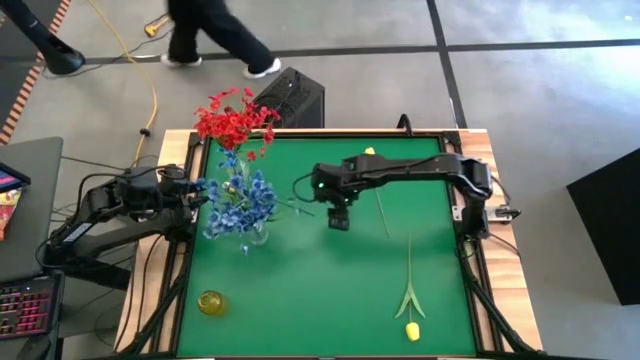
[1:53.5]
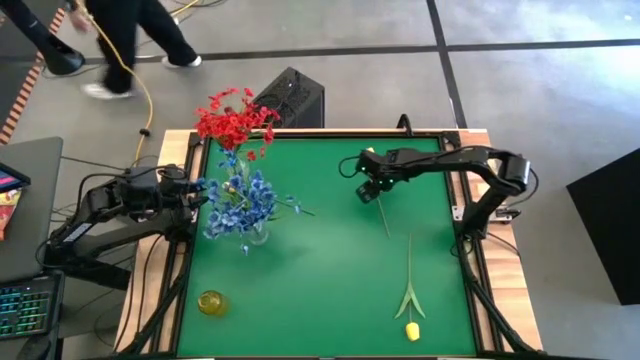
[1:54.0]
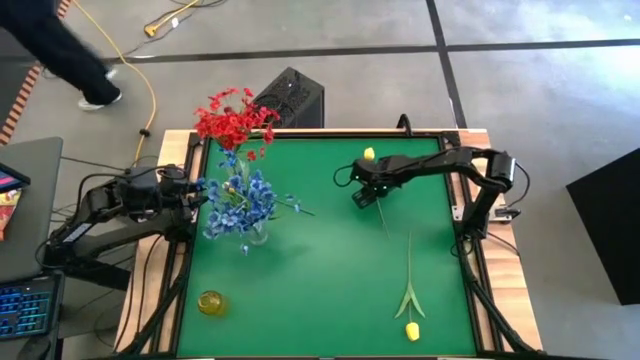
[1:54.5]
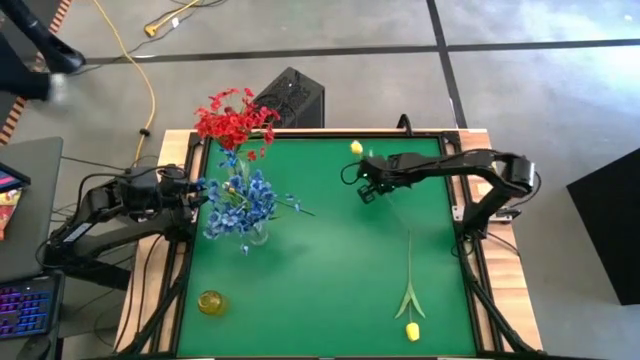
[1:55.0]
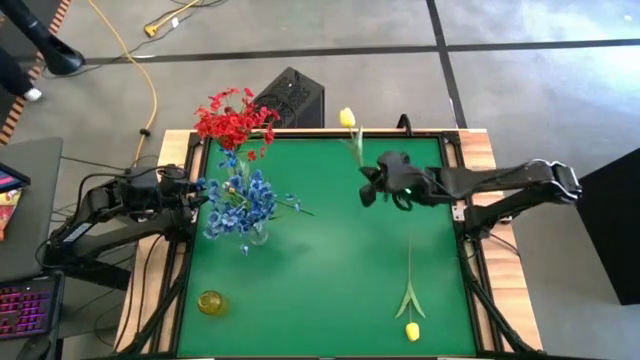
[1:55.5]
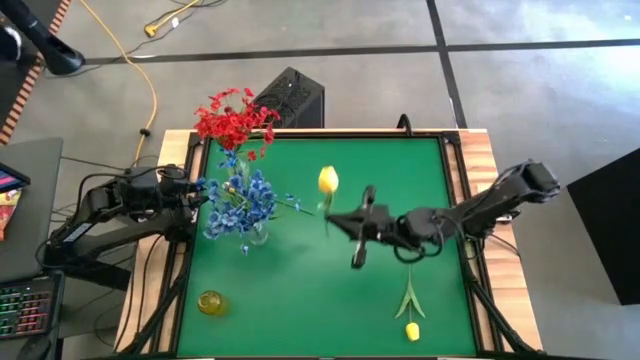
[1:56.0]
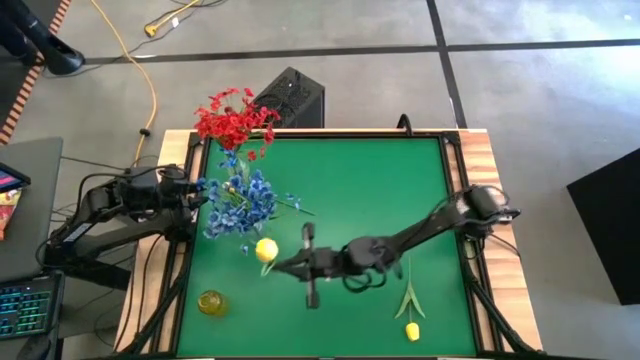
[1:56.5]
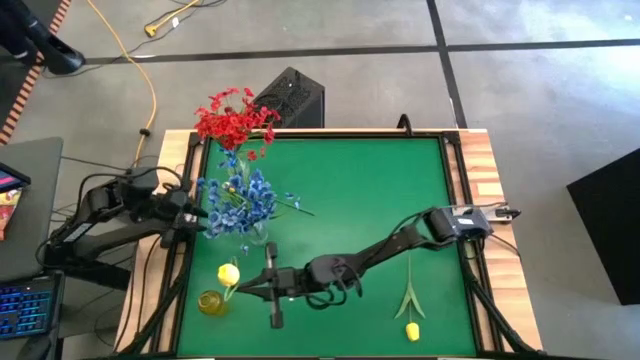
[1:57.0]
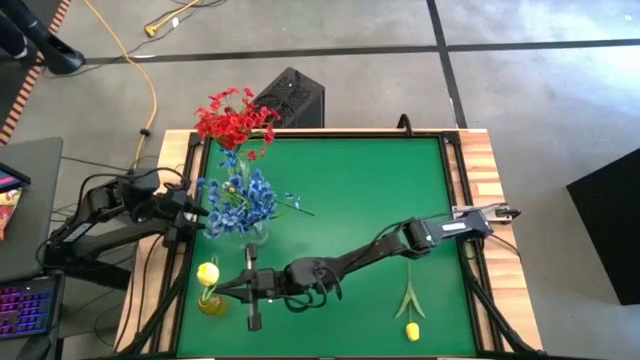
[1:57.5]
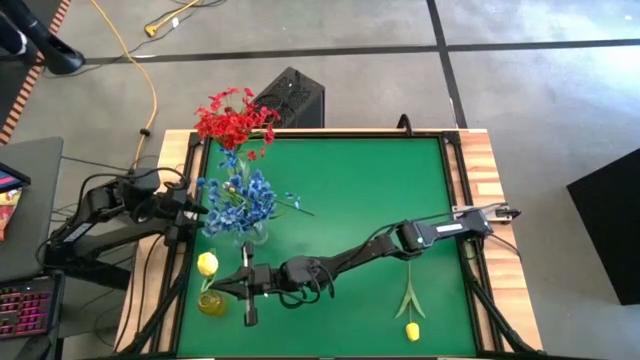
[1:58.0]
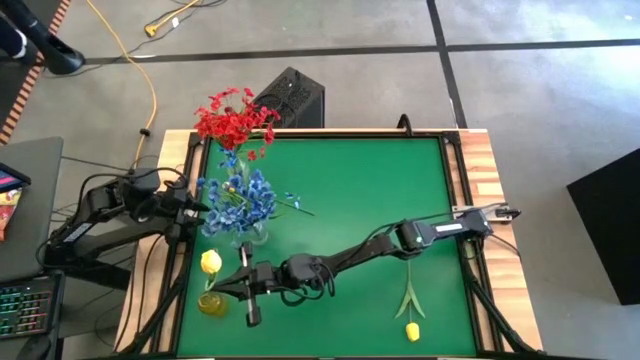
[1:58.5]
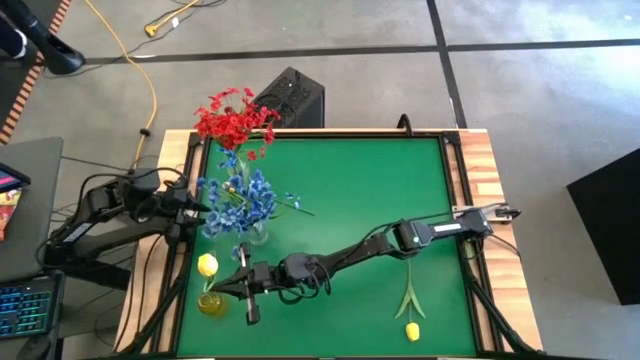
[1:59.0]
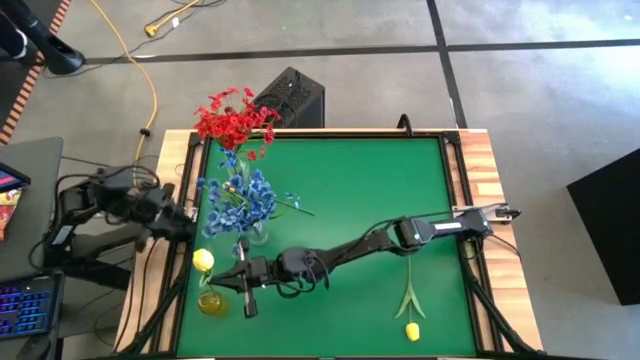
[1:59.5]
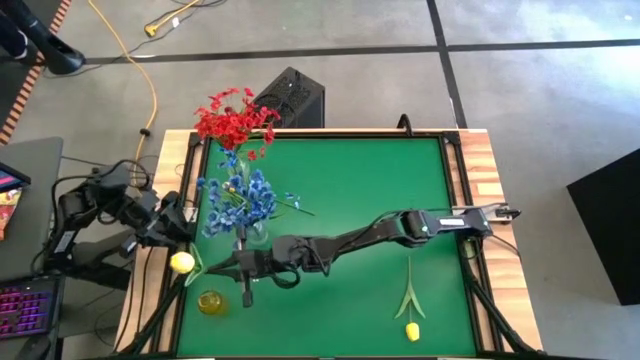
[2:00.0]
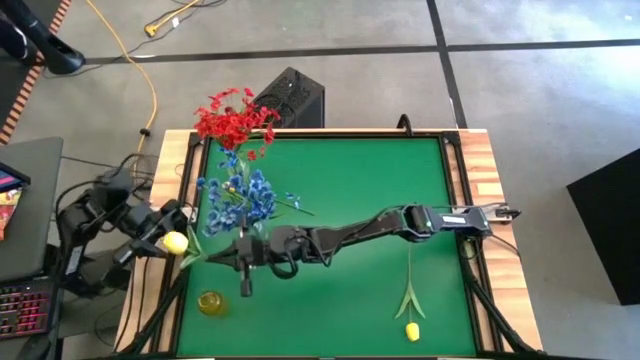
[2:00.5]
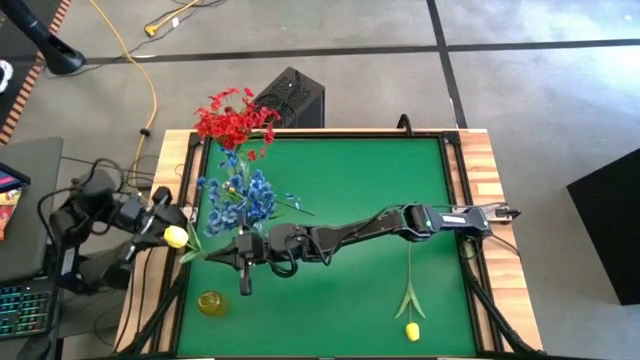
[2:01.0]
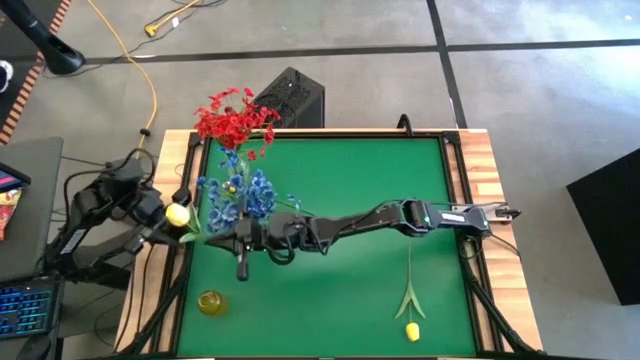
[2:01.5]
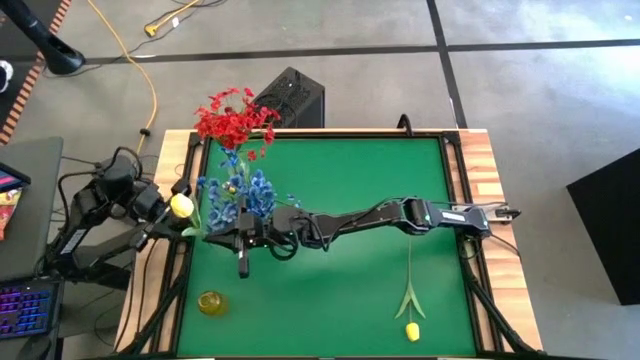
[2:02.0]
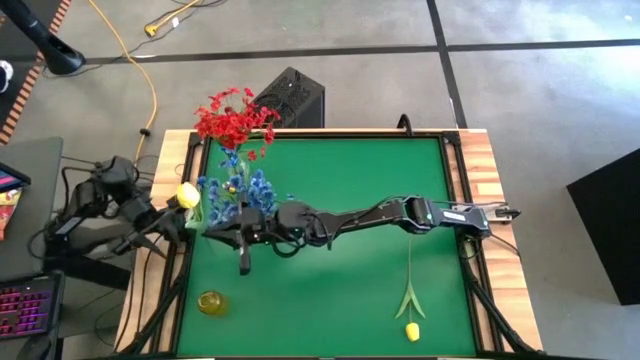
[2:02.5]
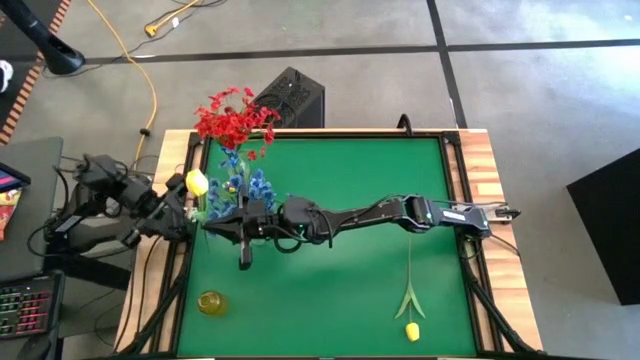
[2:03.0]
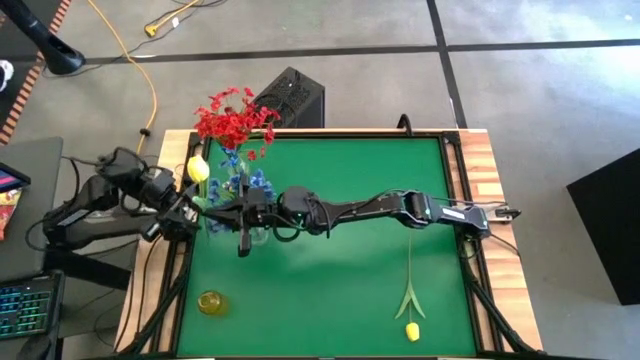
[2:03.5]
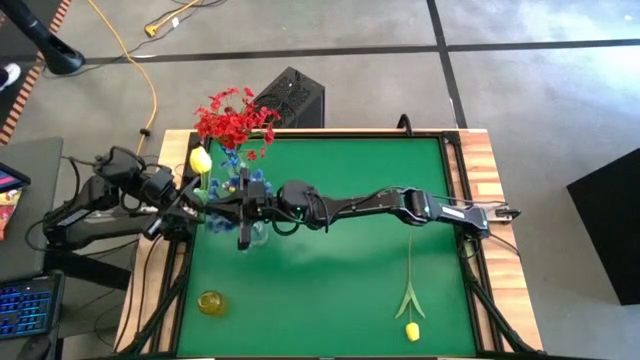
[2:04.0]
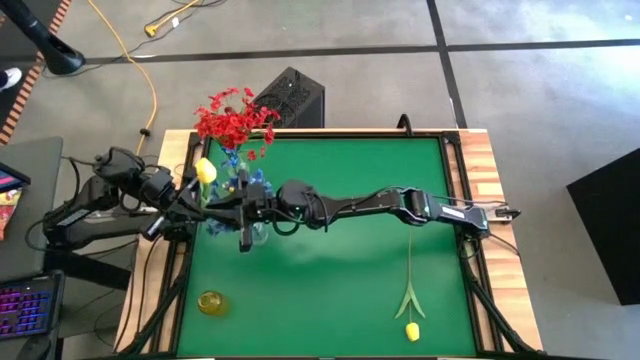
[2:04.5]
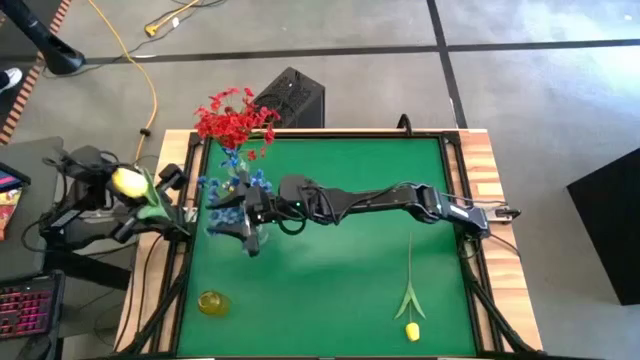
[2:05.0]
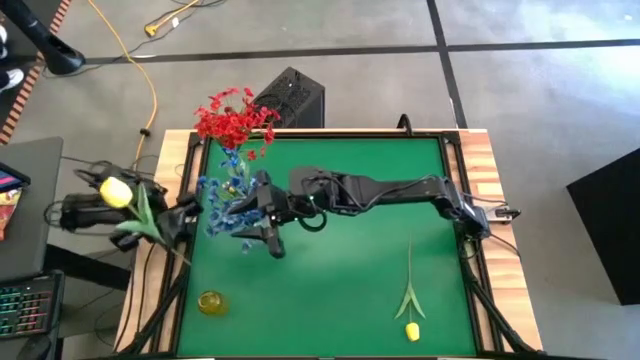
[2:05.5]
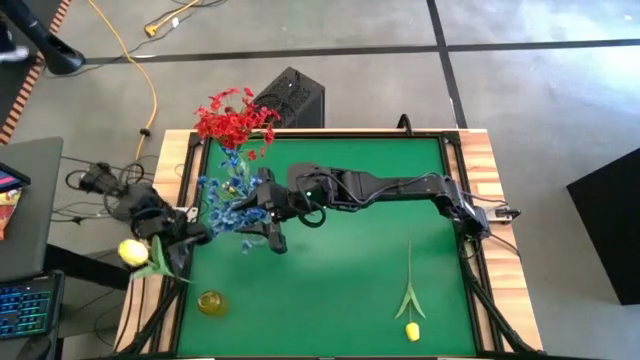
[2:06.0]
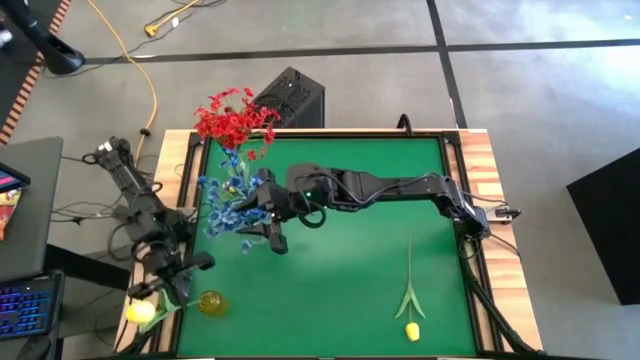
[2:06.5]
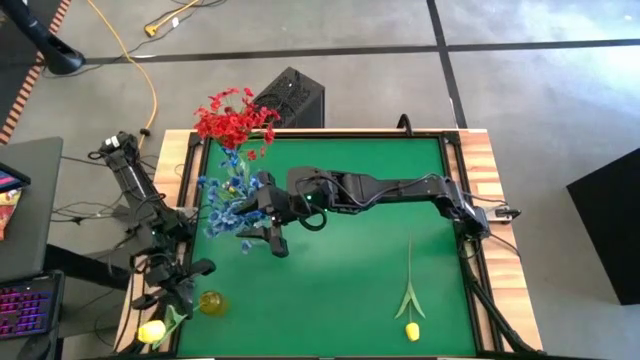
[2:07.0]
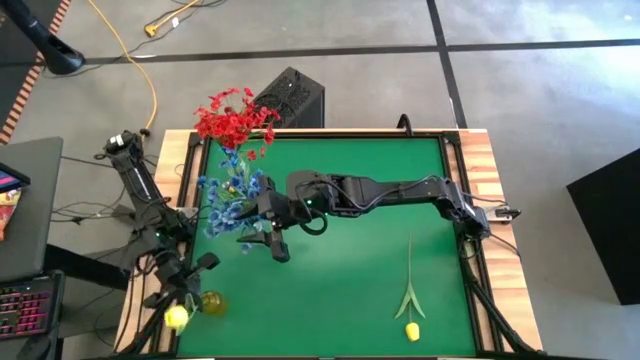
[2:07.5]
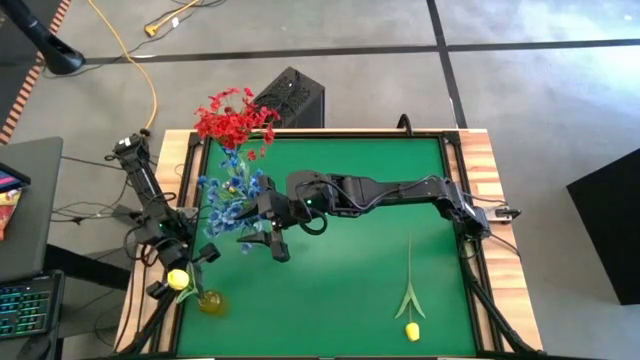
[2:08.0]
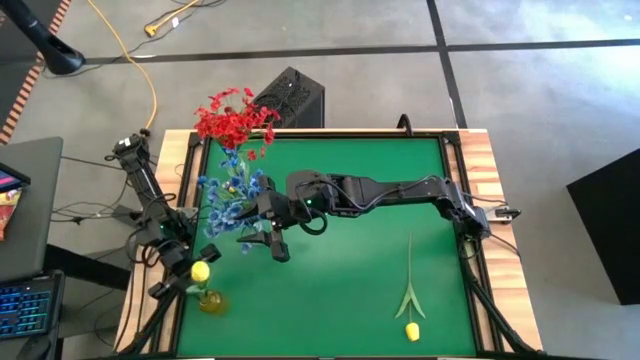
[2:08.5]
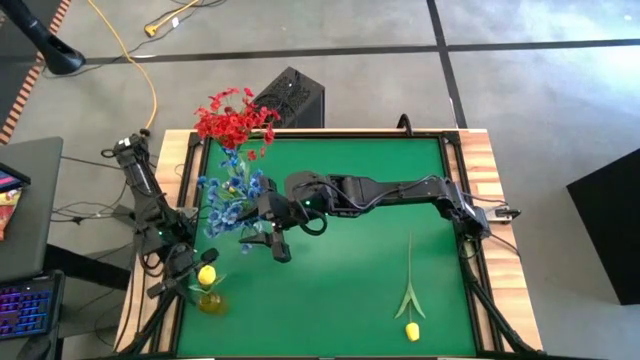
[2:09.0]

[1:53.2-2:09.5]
Task: Sort flowers into vase by color
Put the top right yellow flower into the yellow vase

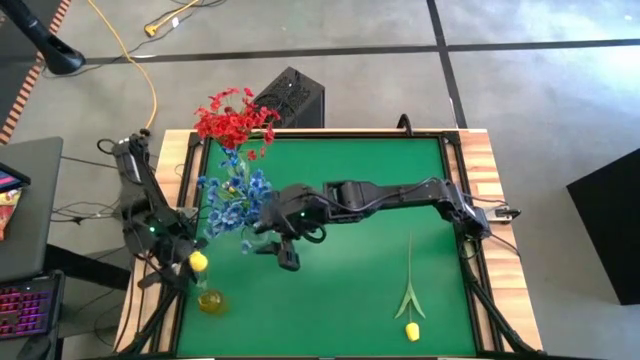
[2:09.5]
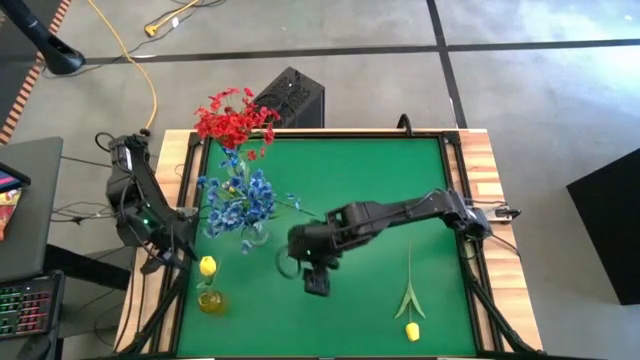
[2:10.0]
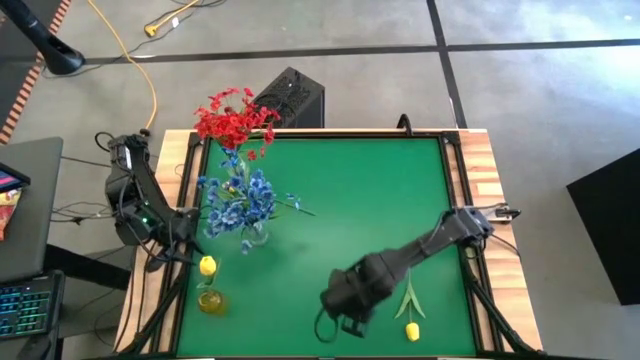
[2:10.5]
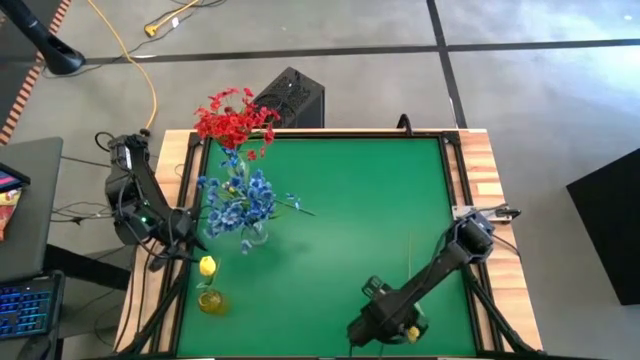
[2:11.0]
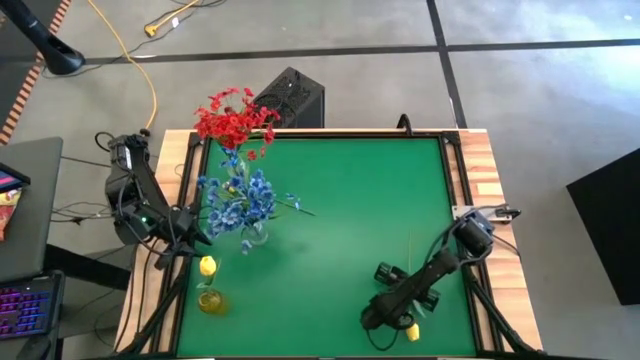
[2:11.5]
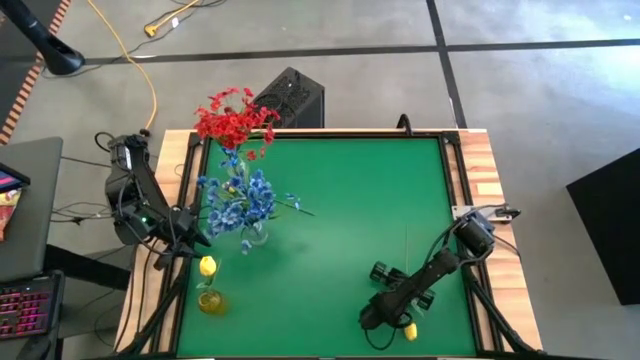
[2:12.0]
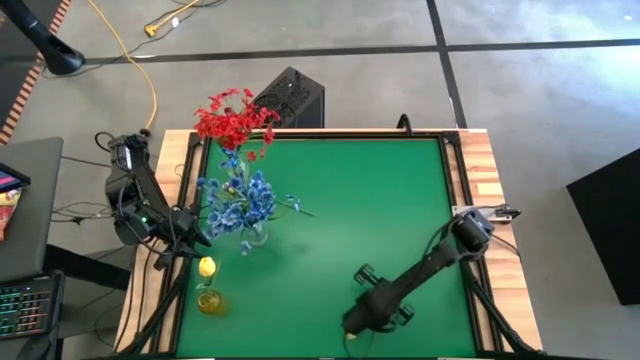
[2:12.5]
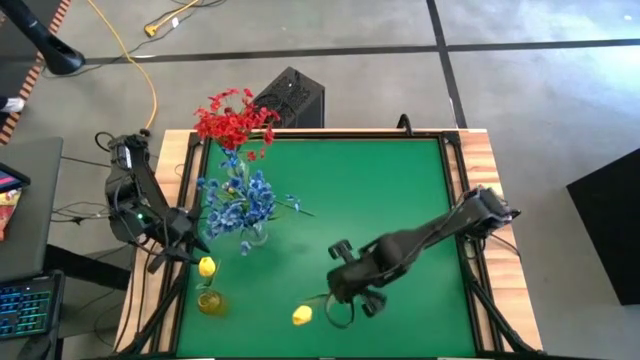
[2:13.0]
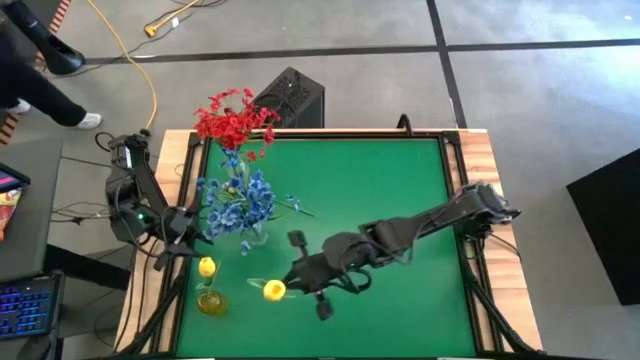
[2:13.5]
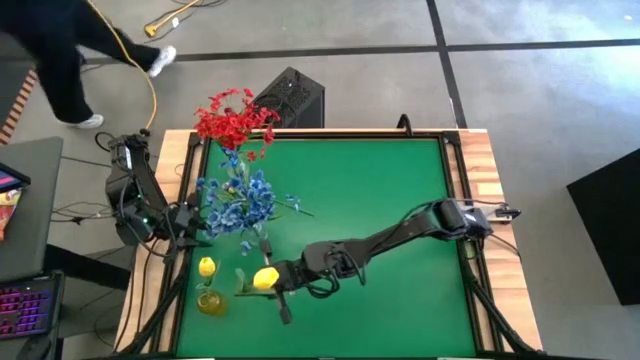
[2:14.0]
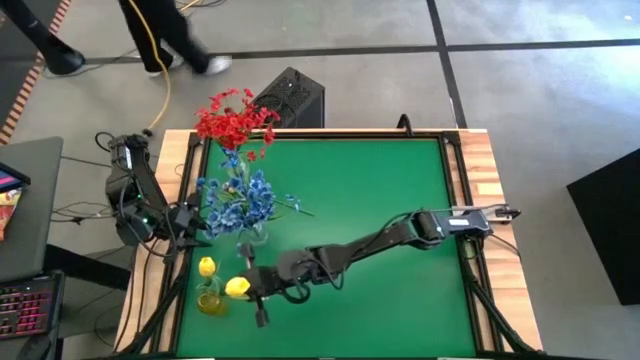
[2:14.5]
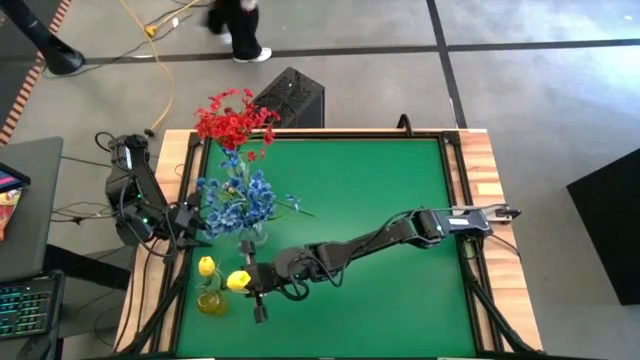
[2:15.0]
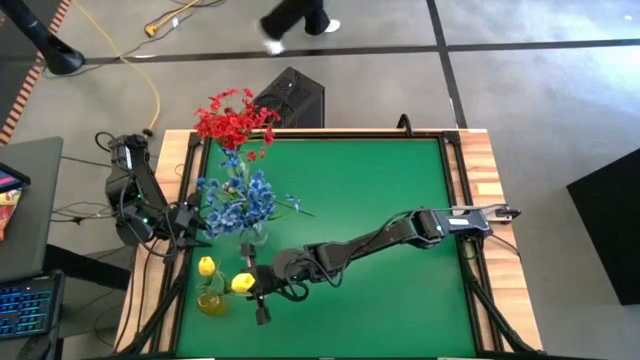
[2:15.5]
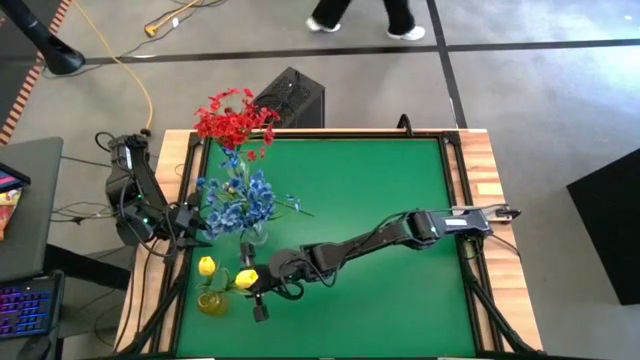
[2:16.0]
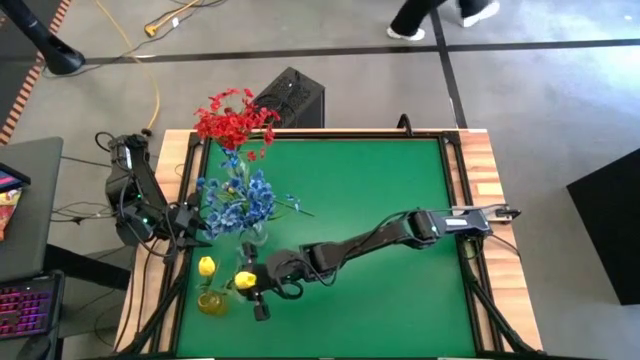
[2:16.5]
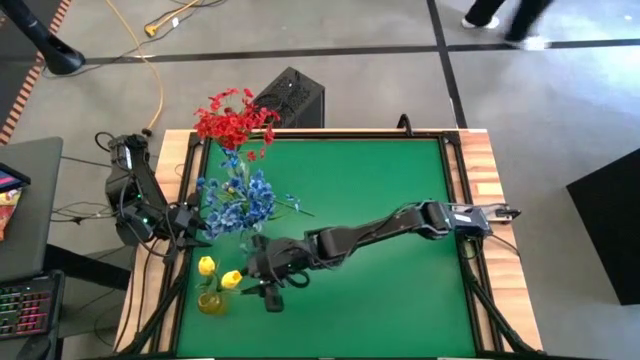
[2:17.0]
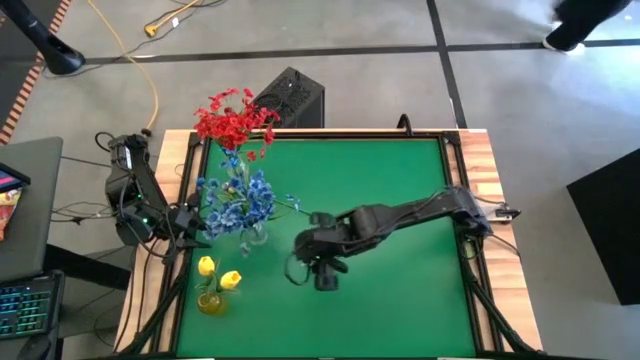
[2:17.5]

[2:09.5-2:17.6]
Put the bottom right yellow flower into the yellow vase
